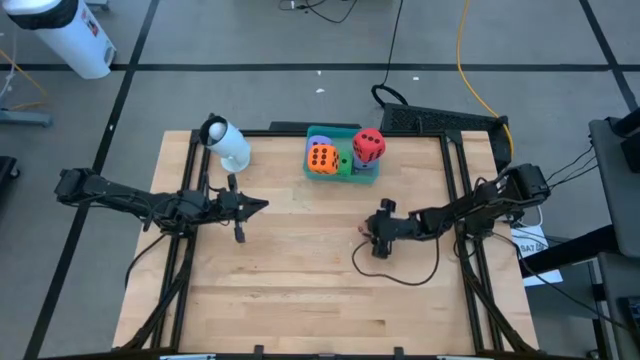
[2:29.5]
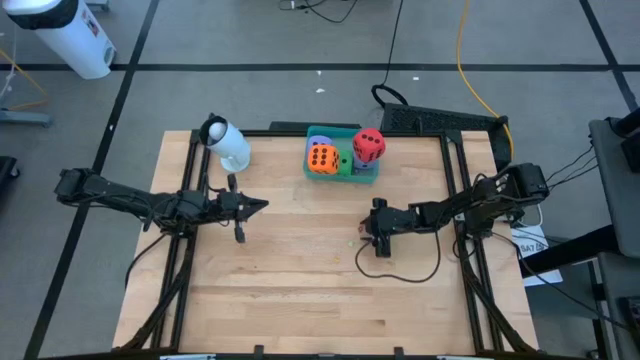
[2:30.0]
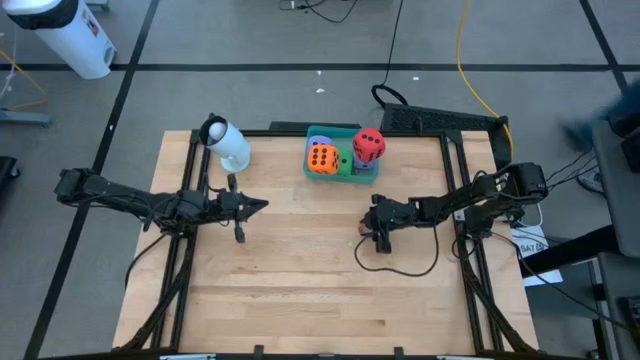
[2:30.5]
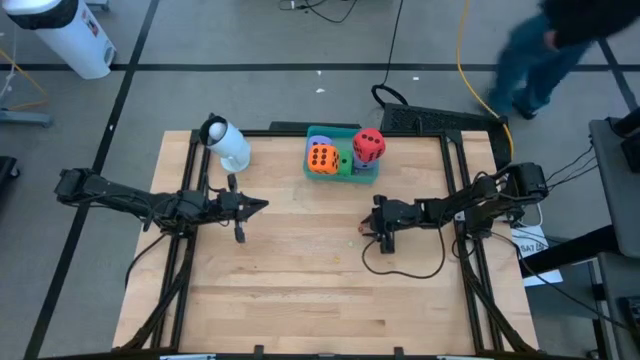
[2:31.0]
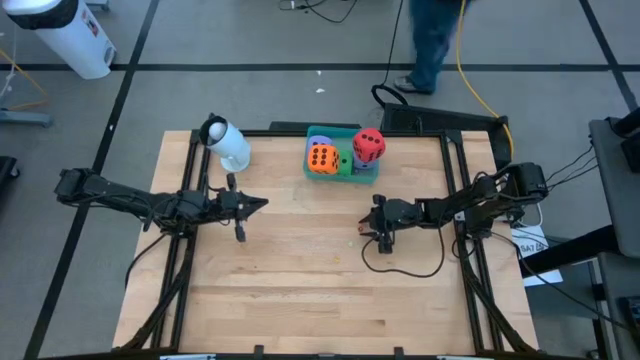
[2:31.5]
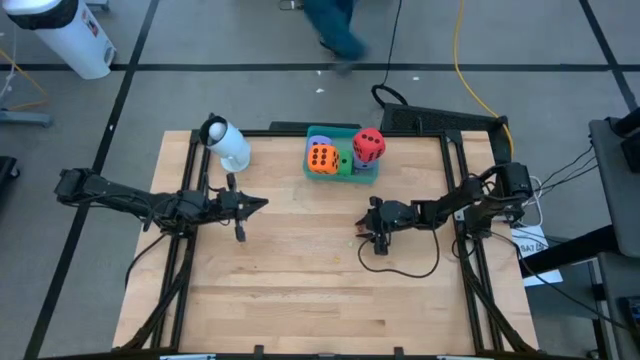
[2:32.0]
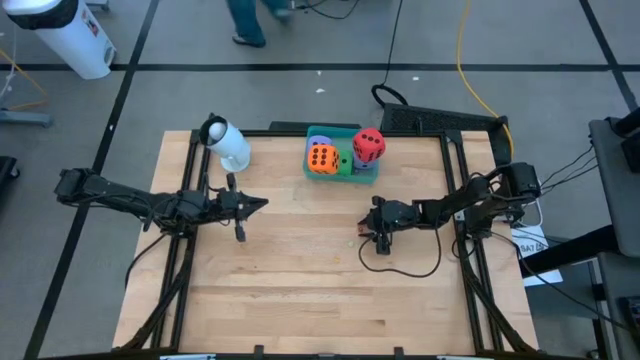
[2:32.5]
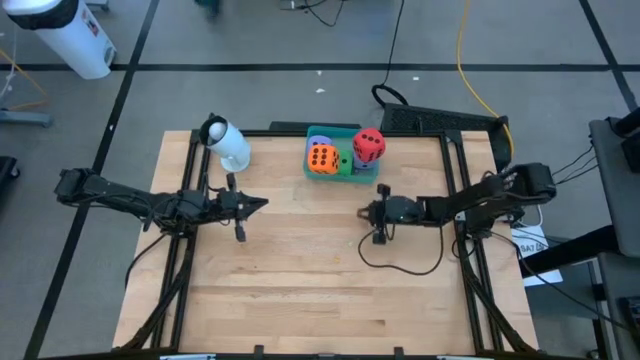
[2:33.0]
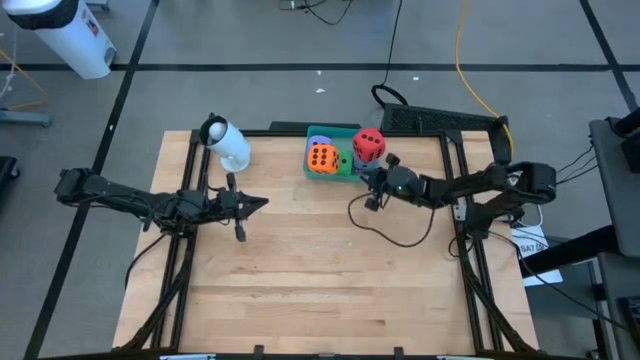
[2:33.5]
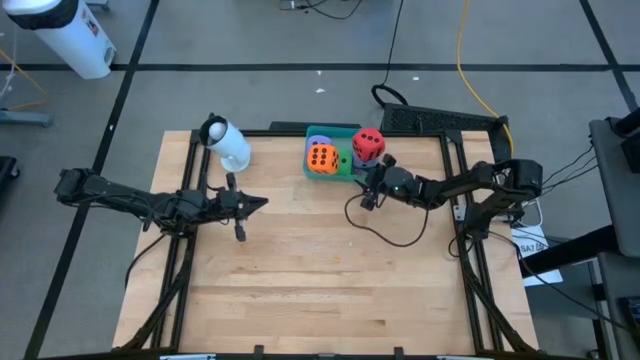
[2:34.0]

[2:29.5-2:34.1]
Task: Pick & Place Dice
Put the small red dice into the green bin

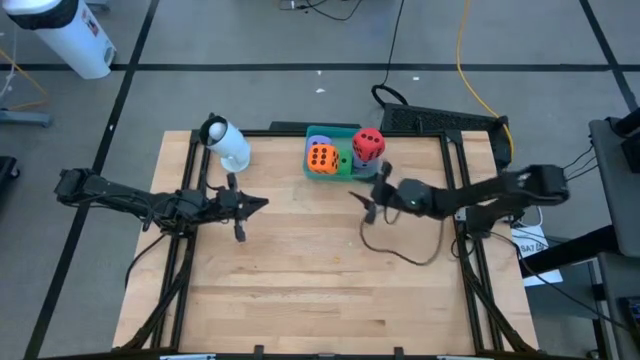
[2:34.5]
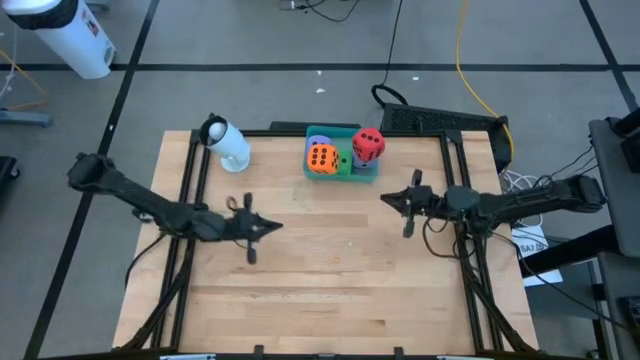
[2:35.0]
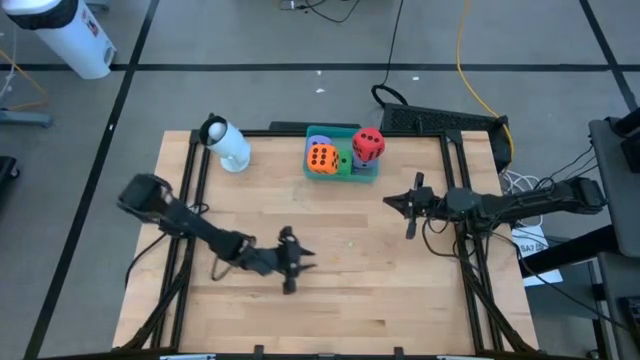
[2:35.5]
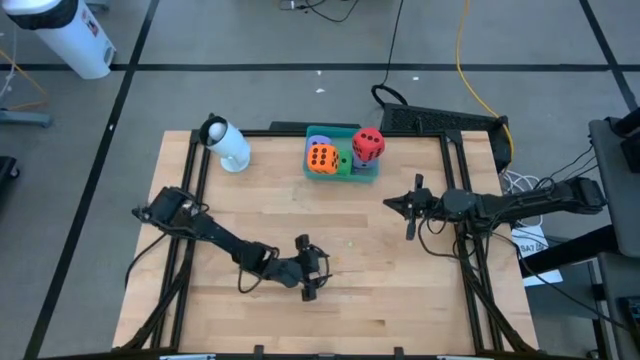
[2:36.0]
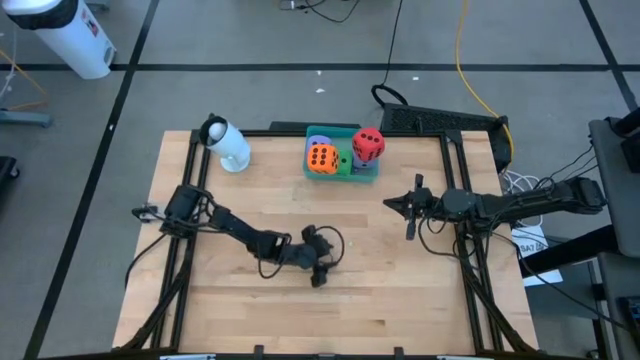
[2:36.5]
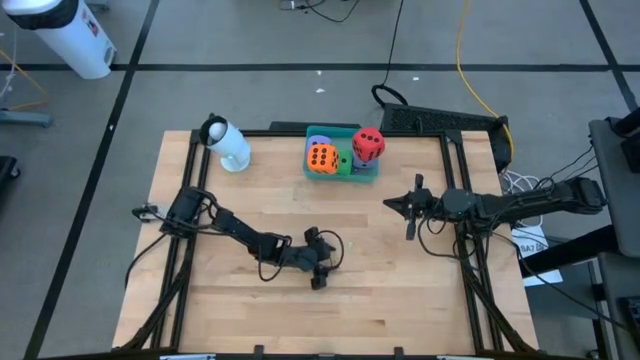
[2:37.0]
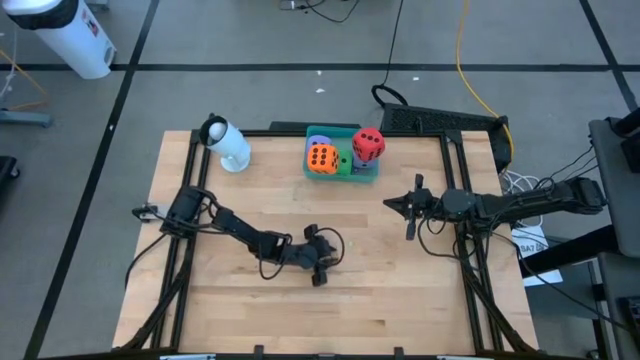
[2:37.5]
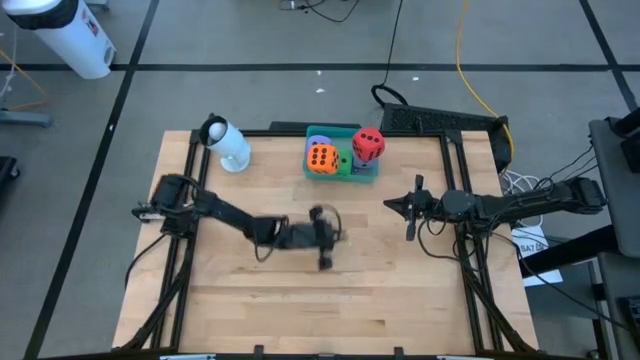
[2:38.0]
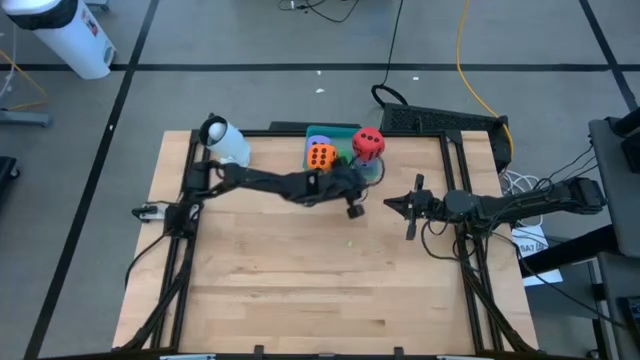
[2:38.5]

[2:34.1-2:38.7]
Put the small yellow dice into the green bin

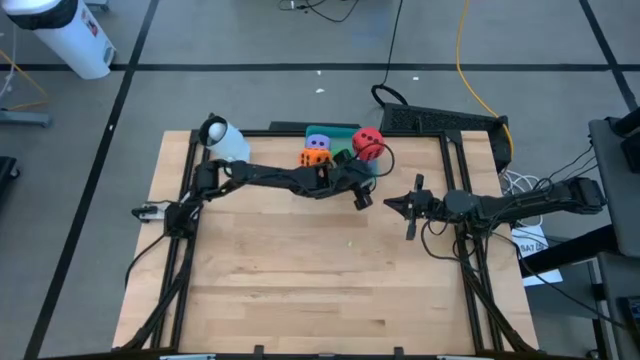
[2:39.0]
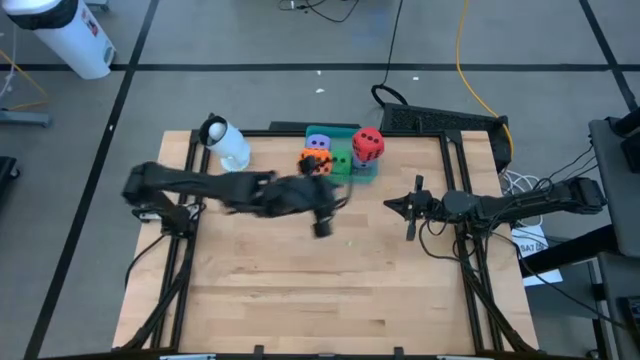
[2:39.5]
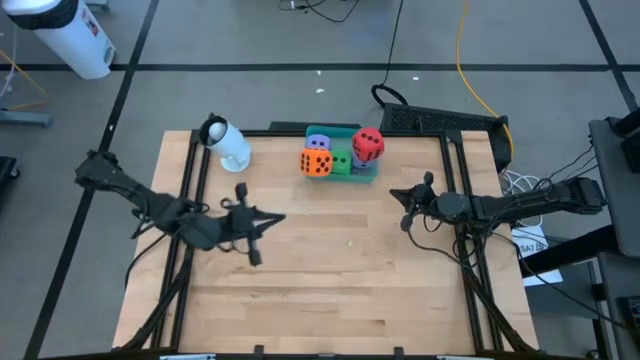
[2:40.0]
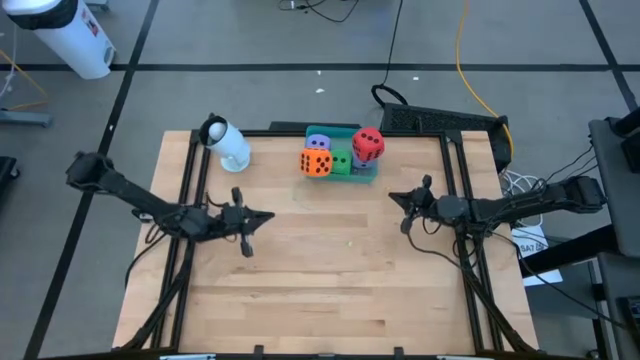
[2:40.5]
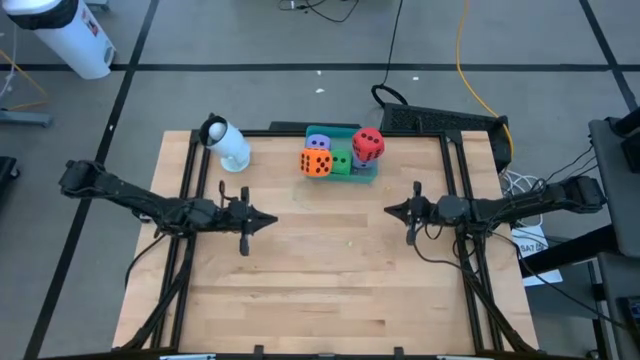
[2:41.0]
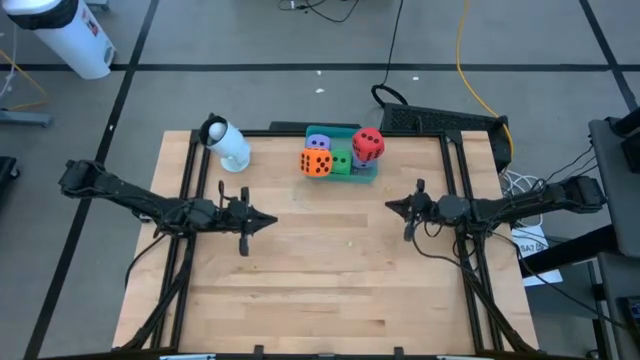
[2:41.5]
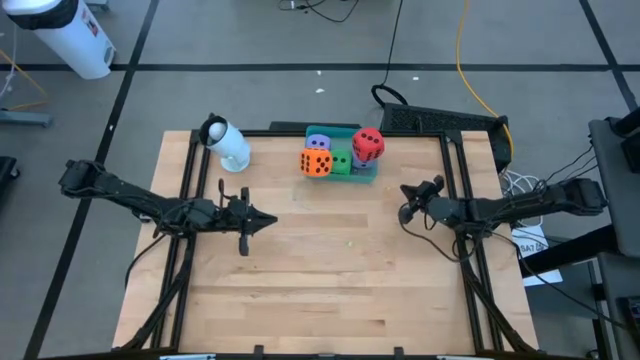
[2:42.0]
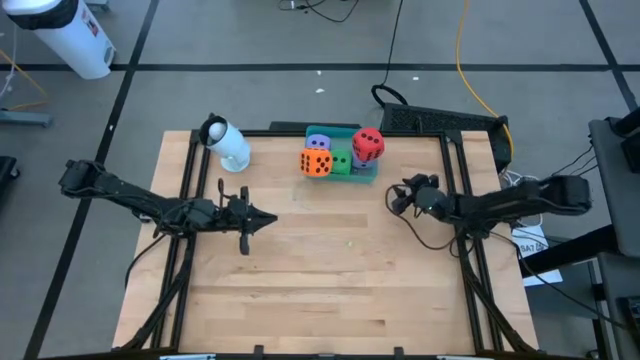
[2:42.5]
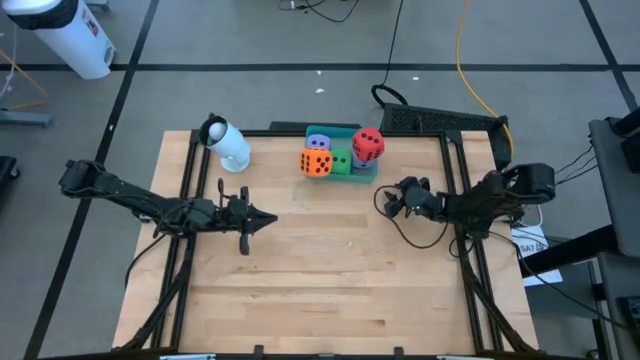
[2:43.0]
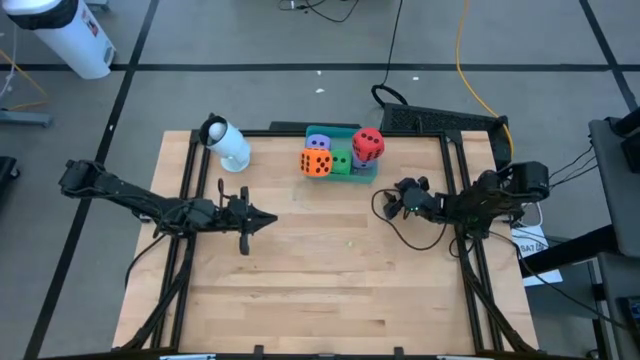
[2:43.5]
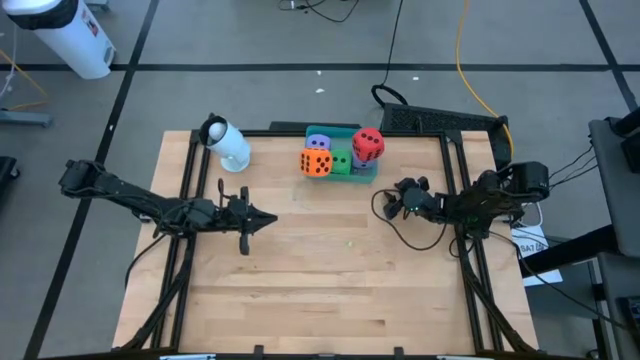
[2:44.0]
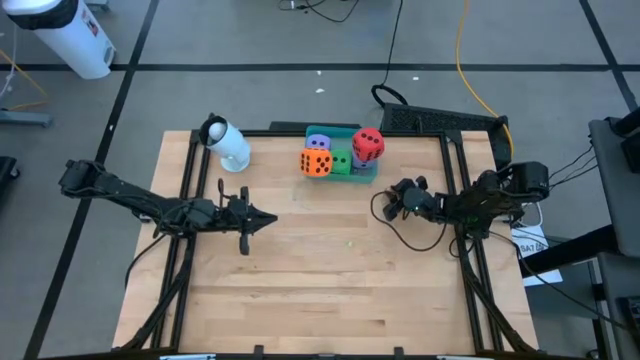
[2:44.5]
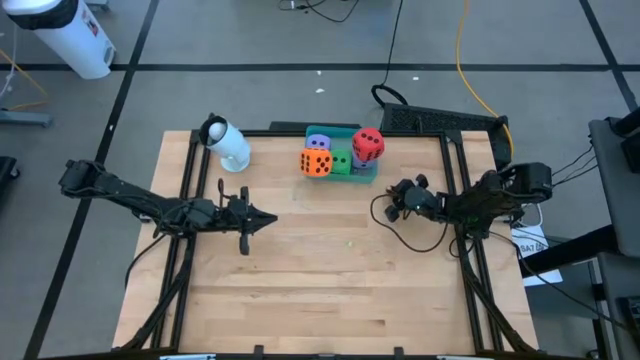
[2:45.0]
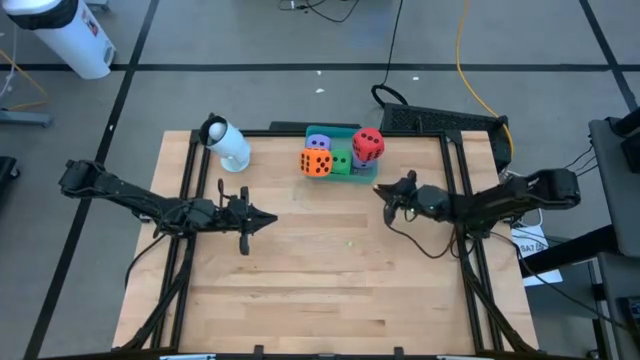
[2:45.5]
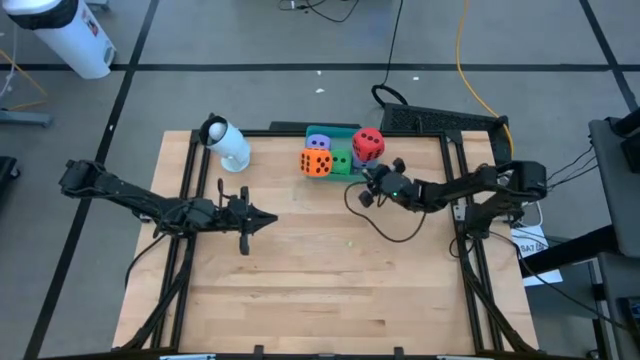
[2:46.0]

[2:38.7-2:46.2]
Put the small yellow dice into the green bin

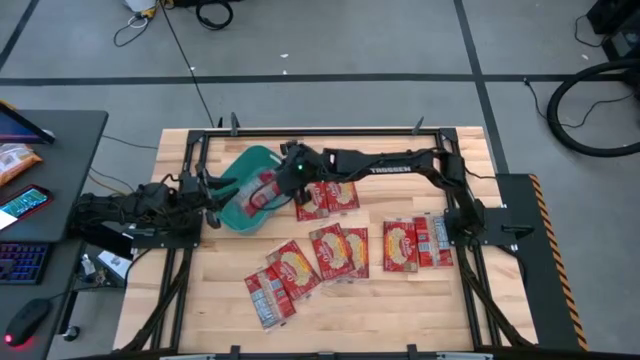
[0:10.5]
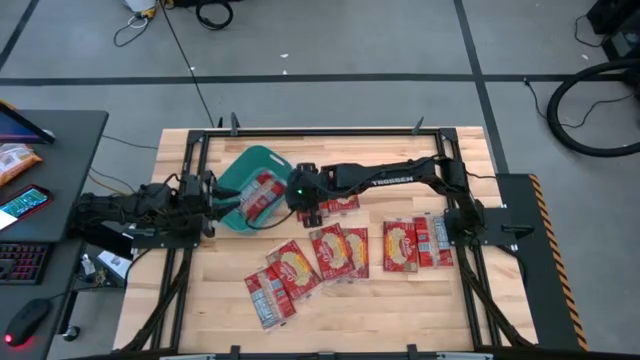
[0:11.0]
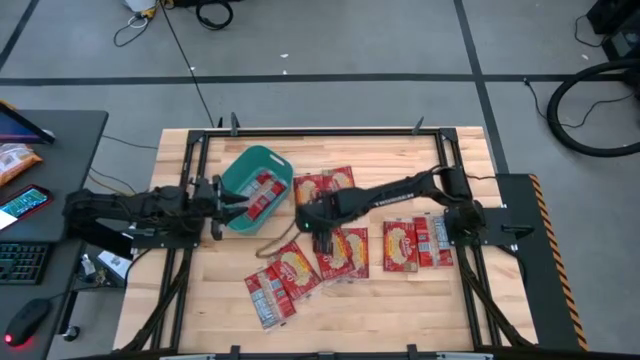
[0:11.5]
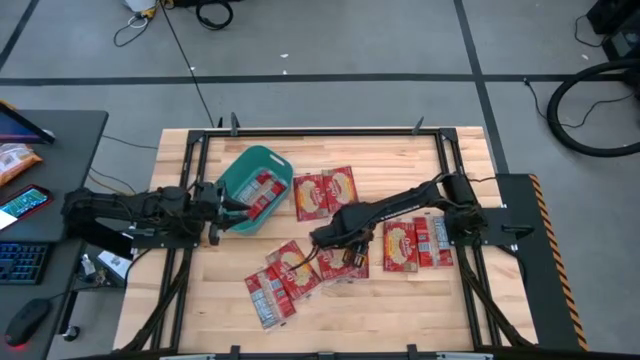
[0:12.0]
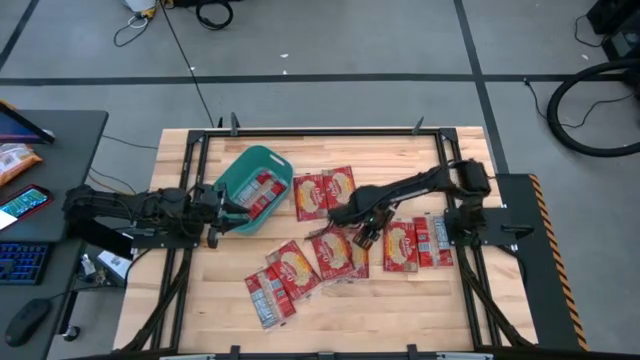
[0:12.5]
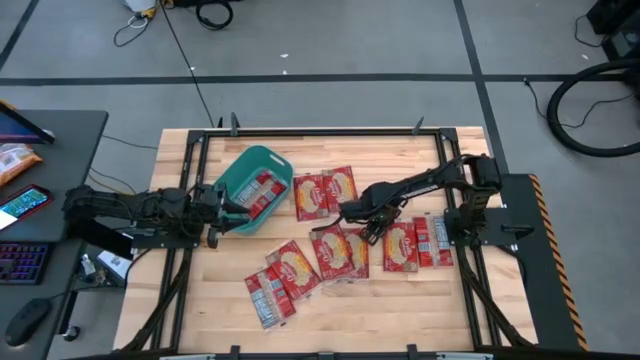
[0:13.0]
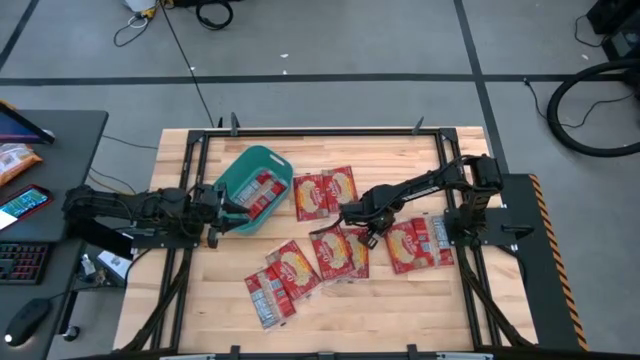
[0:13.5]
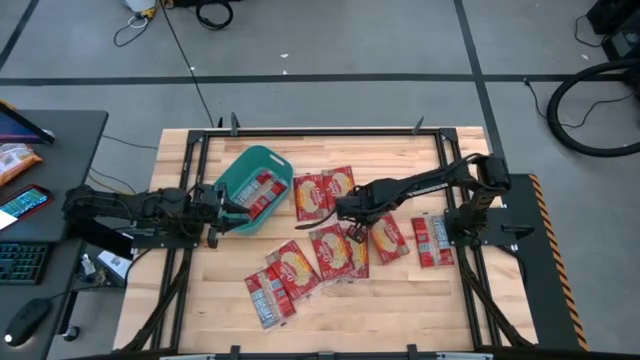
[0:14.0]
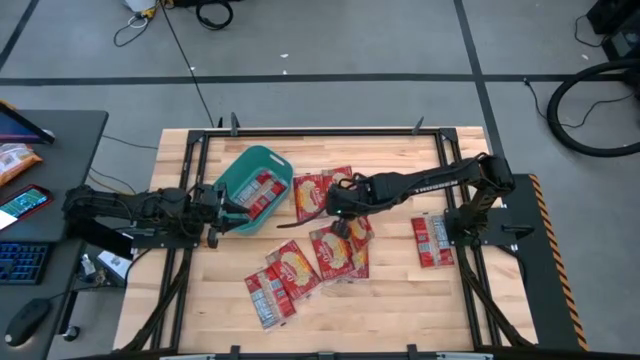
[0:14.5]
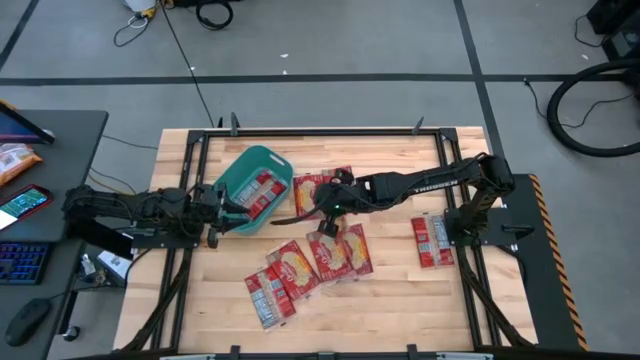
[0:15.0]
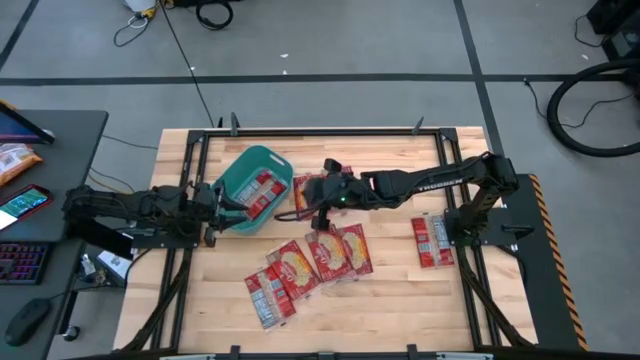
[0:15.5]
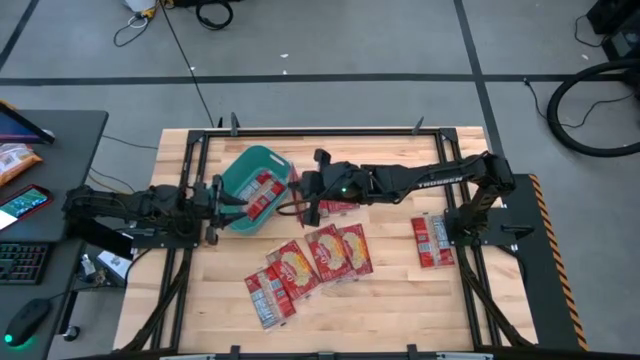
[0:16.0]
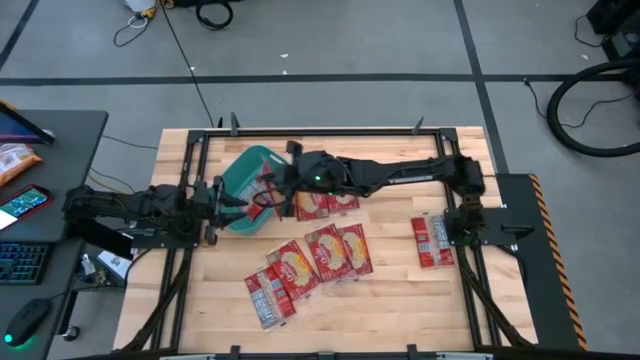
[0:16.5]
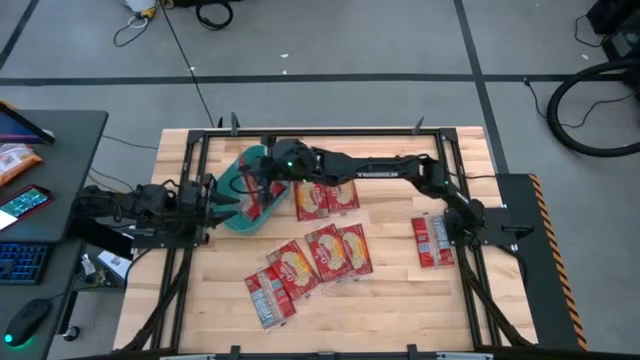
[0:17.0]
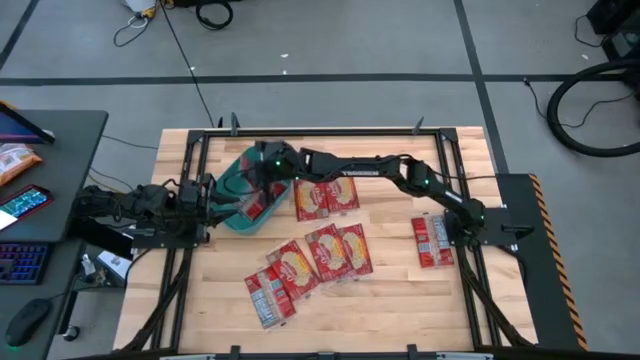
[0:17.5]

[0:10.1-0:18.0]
Task: Sort popcorn bags into baskets
Put the red popcorn bag into the green bin
